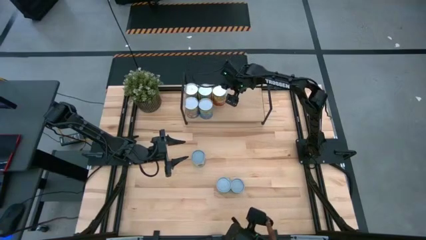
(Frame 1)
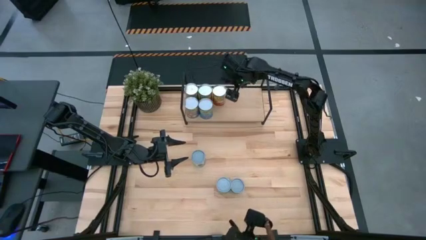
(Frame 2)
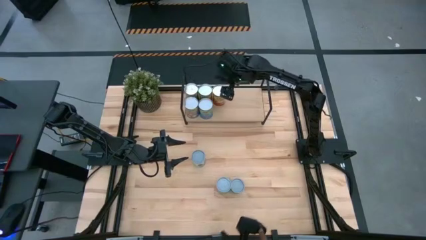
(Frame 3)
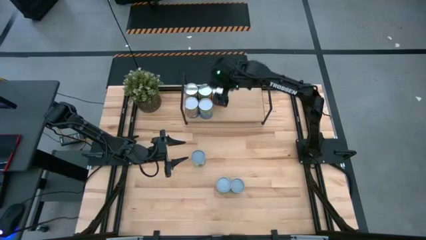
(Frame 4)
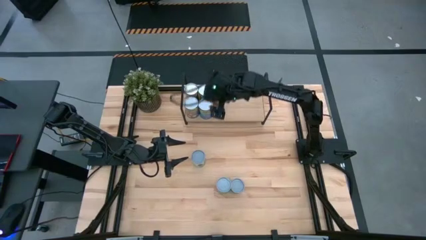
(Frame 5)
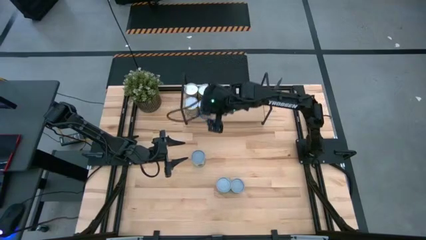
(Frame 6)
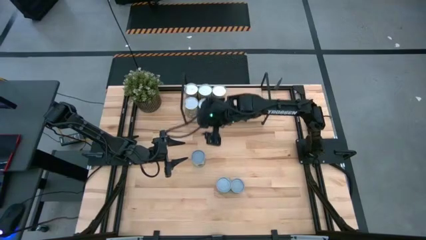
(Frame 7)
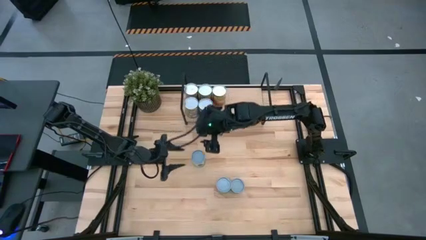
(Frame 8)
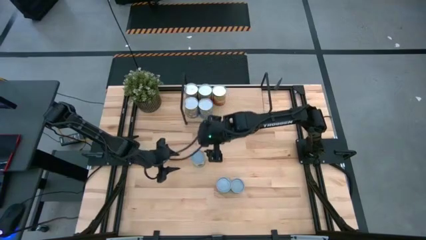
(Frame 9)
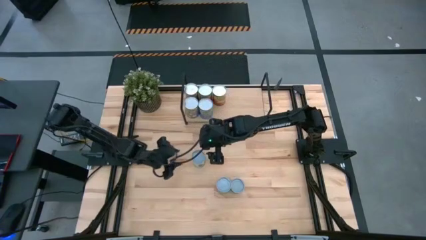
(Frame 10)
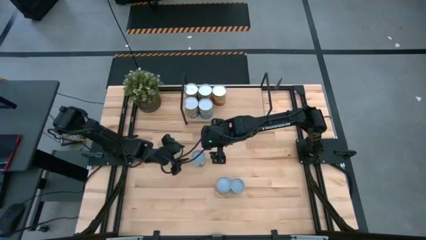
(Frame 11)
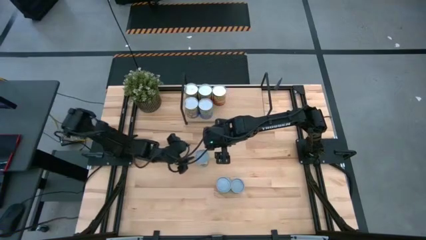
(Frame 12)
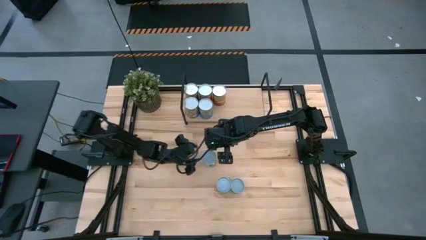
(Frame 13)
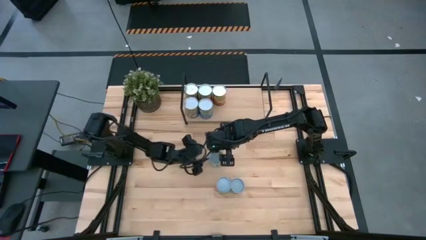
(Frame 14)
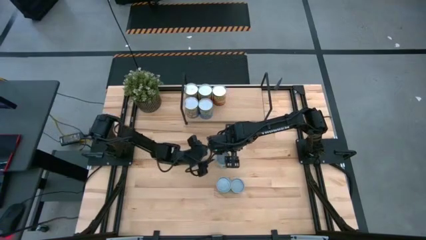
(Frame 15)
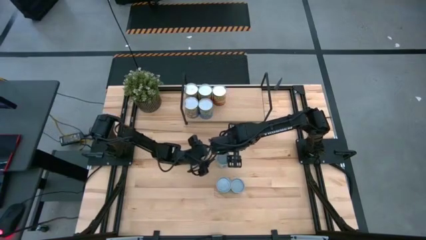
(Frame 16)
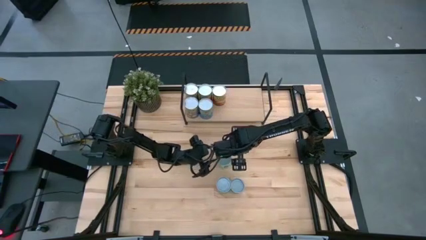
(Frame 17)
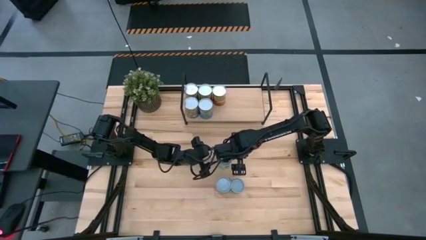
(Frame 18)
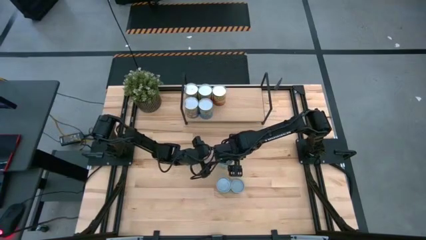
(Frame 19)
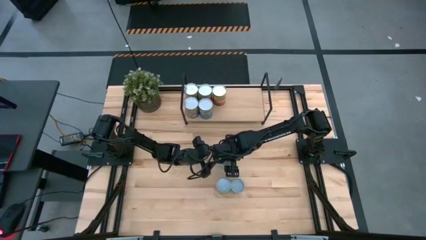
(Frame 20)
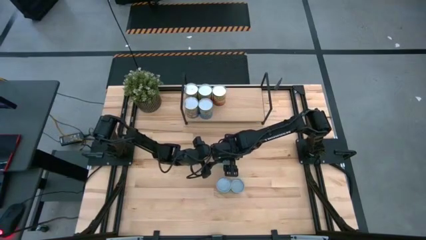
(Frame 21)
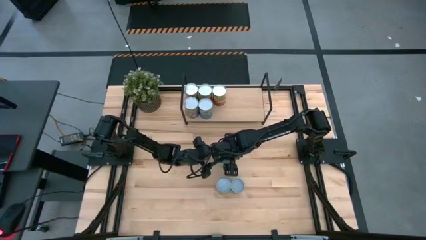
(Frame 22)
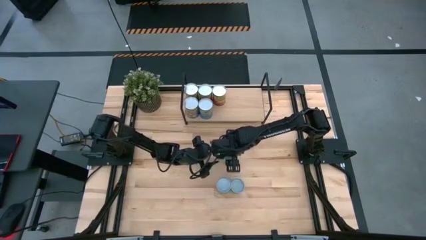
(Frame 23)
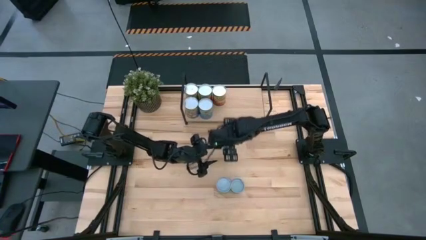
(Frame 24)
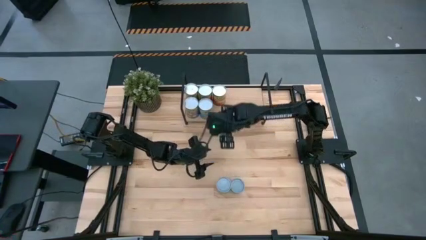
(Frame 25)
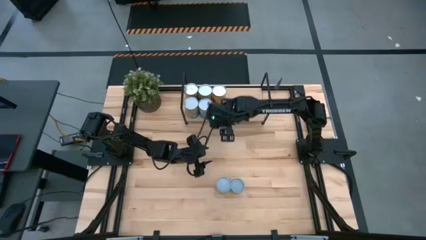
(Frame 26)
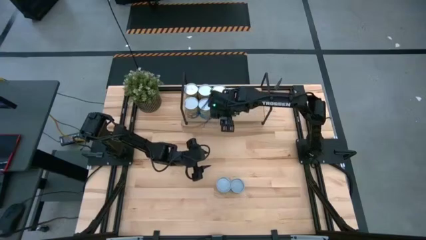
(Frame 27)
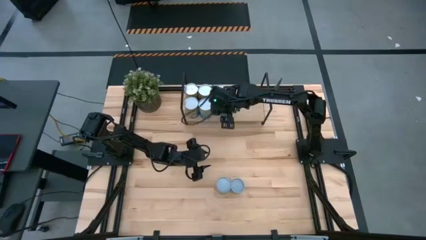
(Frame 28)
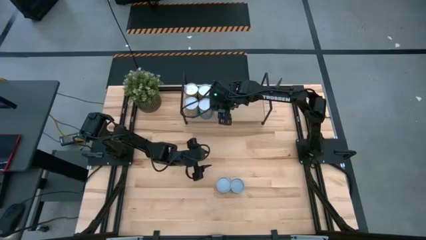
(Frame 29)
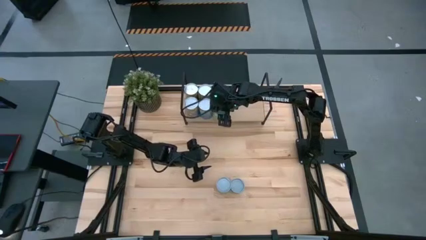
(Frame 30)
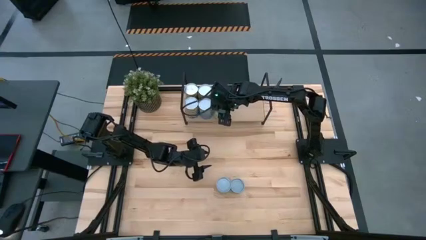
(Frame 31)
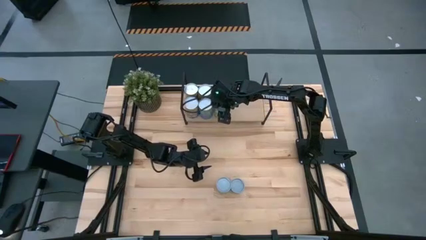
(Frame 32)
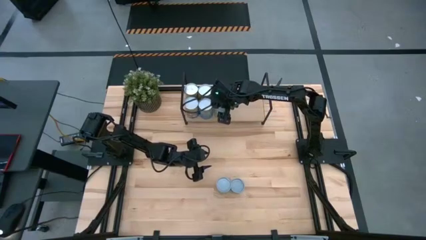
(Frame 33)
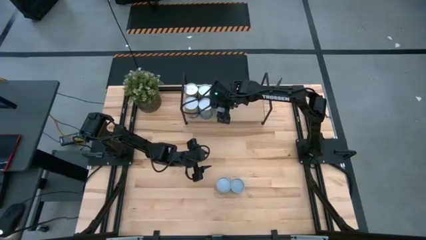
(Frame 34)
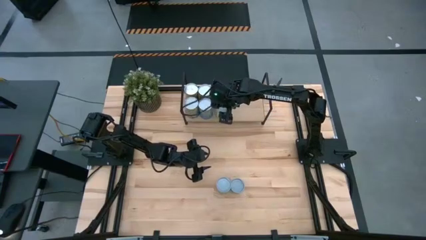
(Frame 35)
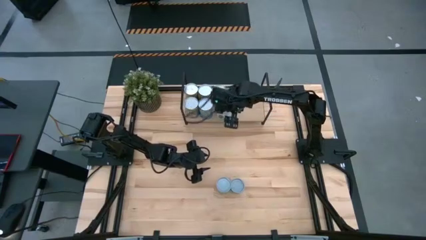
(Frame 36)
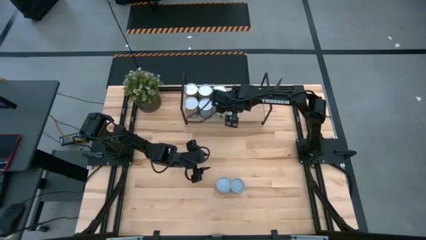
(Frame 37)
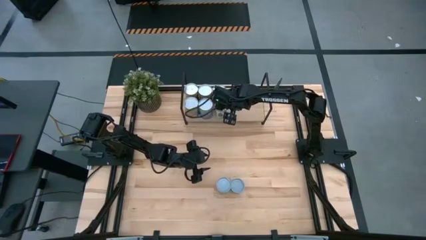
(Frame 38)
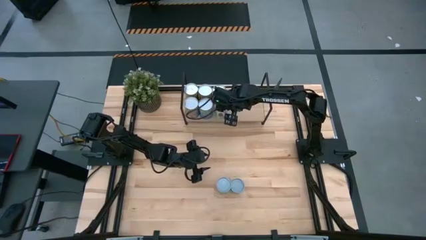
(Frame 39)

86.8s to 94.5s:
Task: Pick and place cans onto a shelf
Put the canned mixed vegetables on the shelf

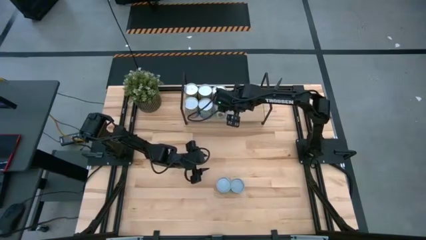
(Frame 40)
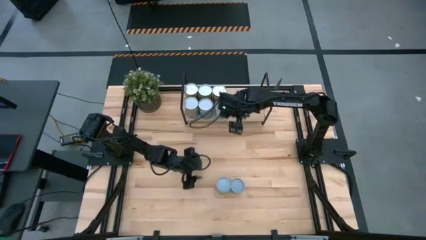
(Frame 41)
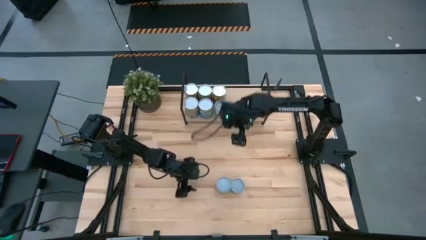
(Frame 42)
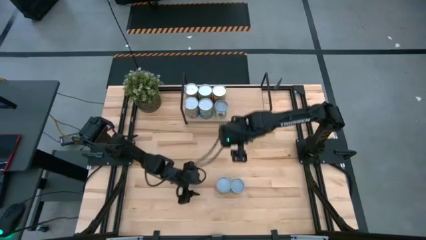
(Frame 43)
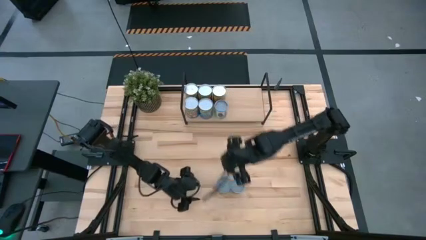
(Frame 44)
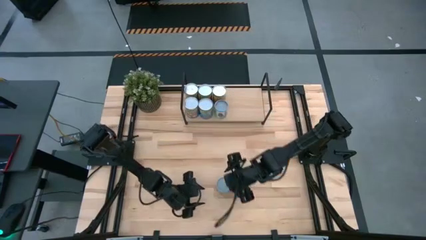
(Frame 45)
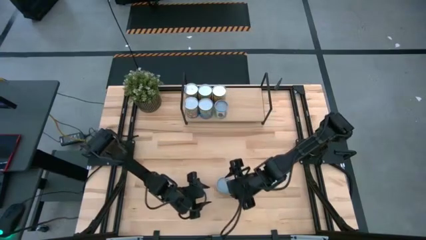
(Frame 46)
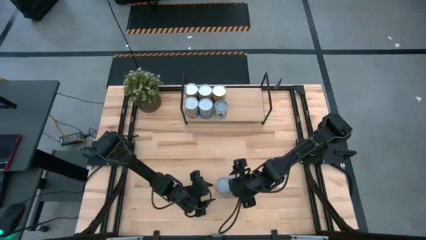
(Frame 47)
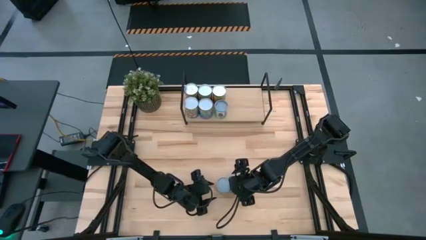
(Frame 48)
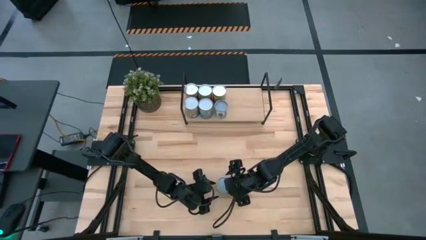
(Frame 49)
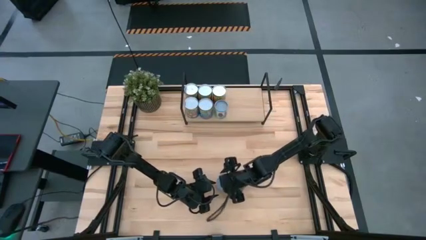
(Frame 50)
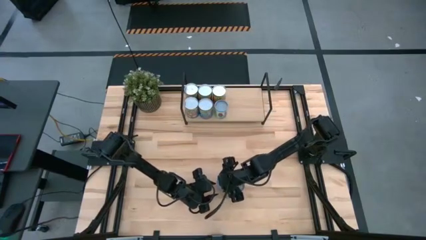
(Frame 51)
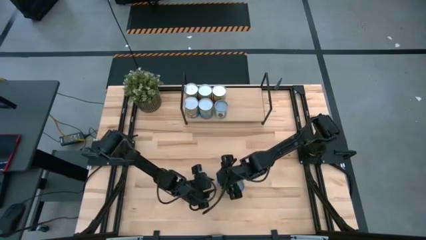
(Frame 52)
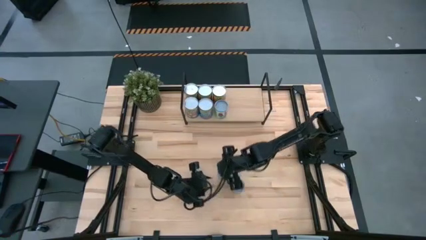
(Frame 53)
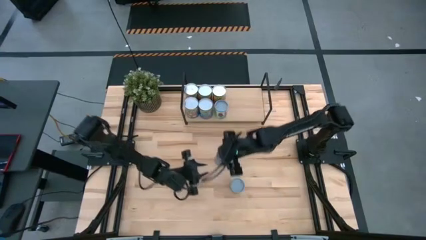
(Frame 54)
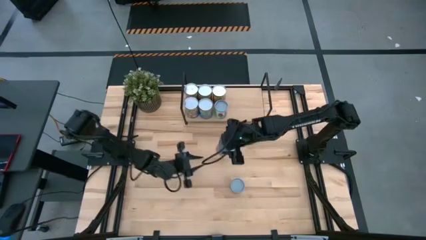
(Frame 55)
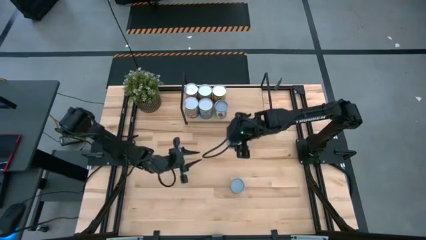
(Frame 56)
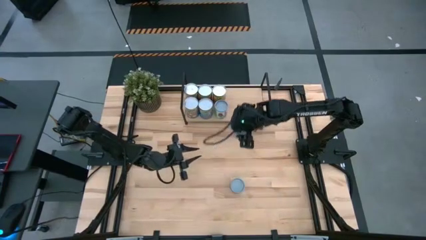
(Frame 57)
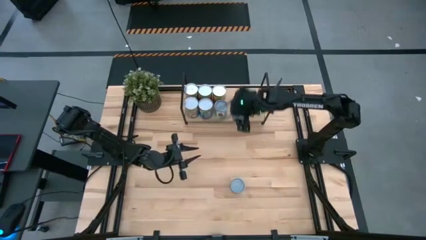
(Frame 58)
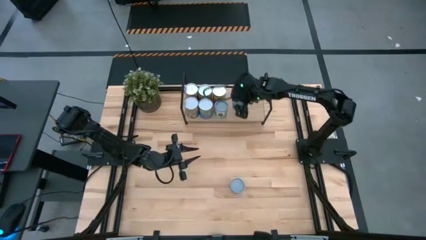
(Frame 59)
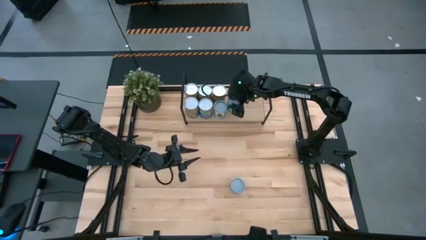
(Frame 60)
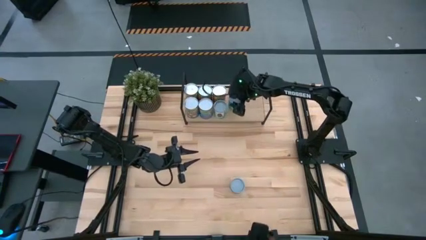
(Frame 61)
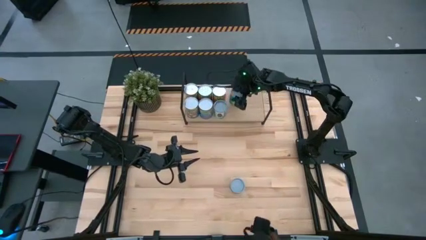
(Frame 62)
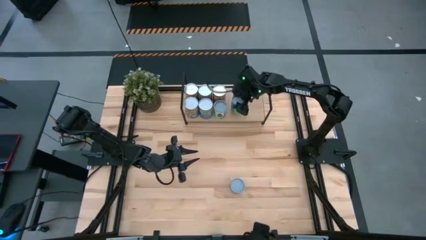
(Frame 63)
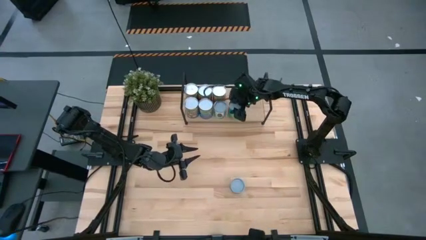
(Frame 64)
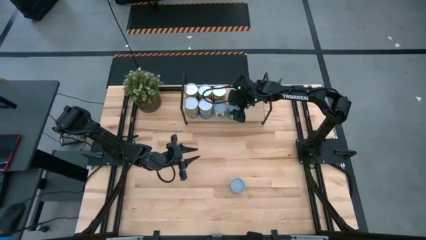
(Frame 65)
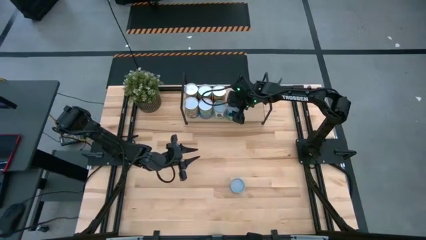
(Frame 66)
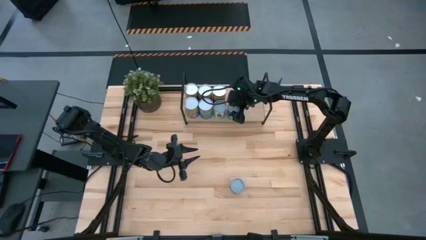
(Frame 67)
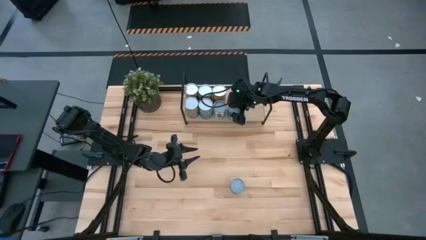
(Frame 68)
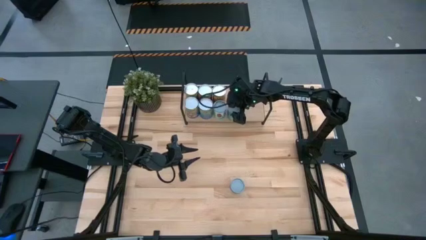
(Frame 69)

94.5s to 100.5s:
Put the canned chicken soup on the shelf

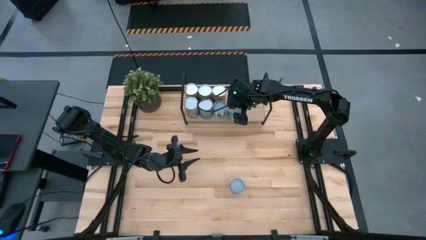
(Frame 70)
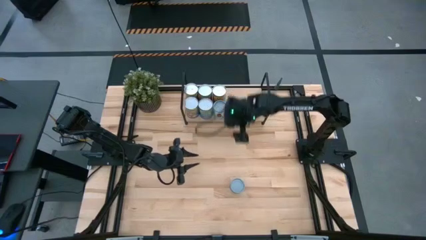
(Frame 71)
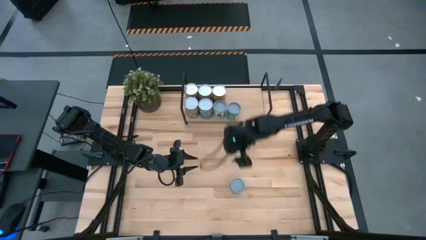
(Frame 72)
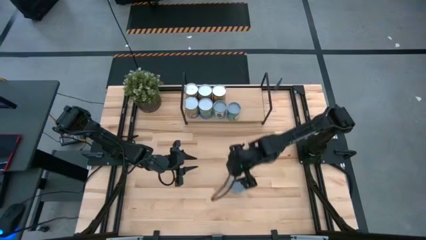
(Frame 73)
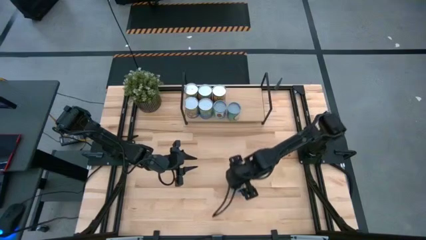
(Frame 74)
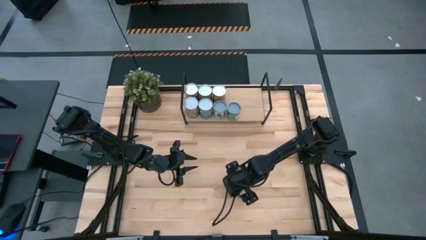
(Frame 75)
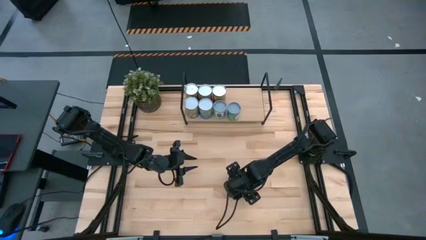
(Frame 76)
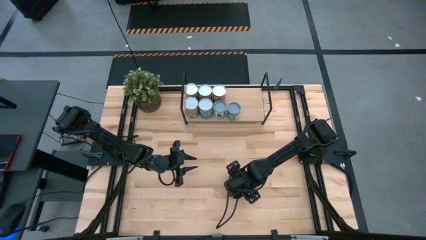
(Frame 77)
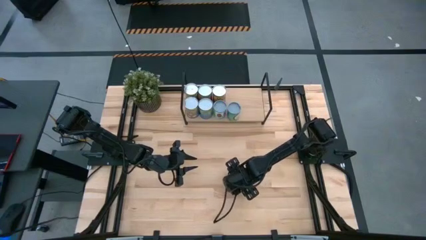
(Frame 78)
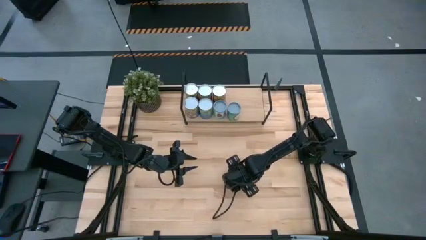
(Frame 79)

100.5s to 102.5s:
Put the canned tuna on the shelf

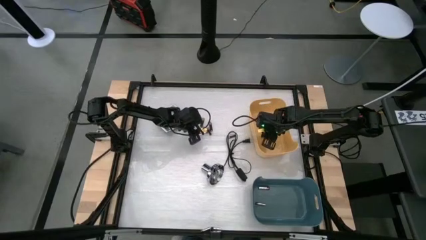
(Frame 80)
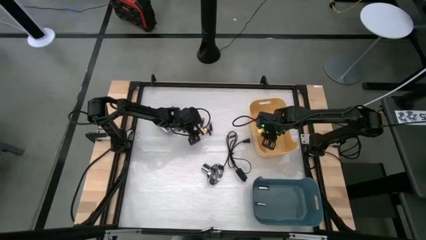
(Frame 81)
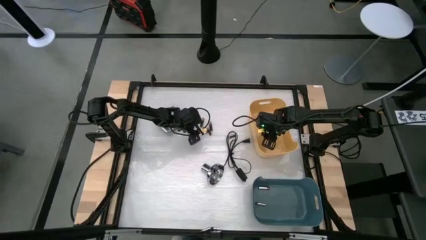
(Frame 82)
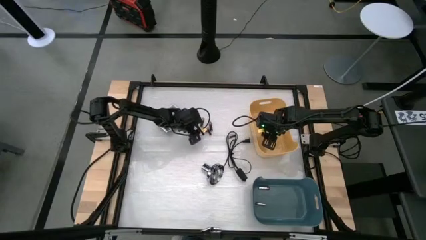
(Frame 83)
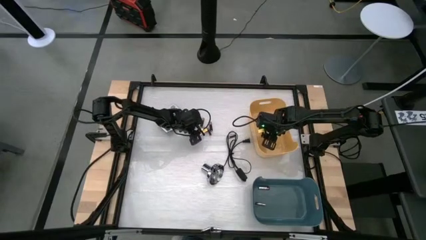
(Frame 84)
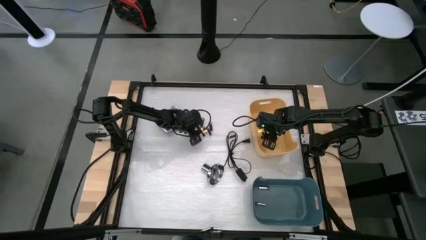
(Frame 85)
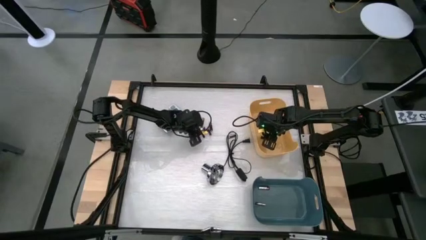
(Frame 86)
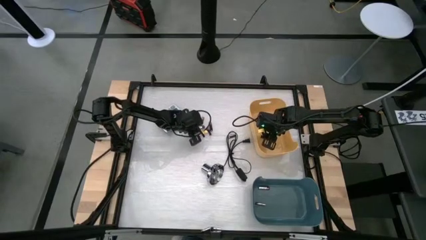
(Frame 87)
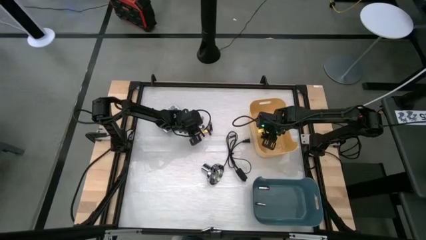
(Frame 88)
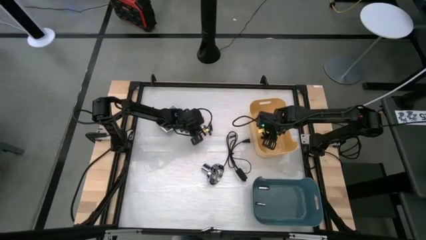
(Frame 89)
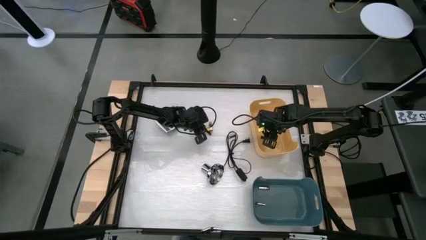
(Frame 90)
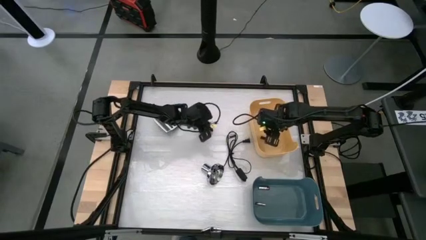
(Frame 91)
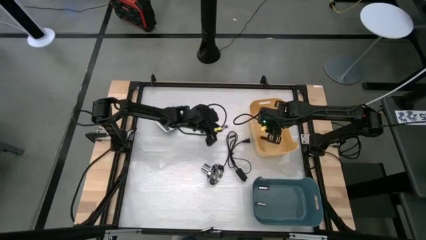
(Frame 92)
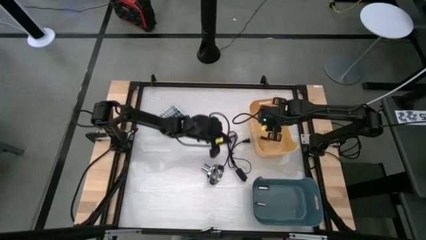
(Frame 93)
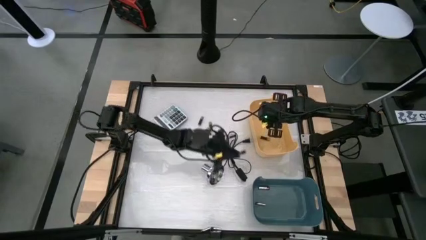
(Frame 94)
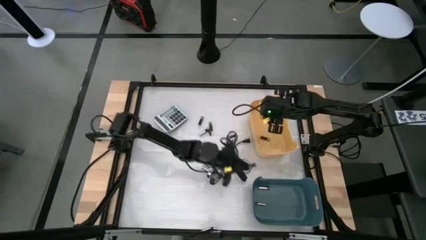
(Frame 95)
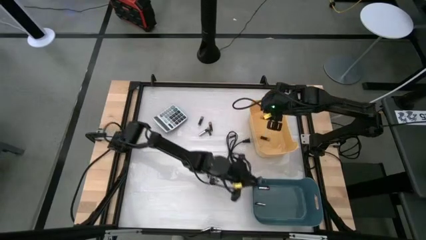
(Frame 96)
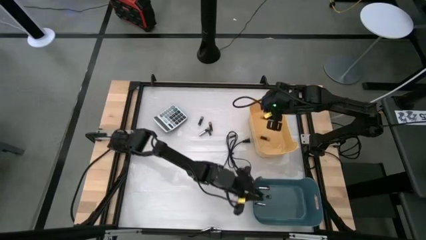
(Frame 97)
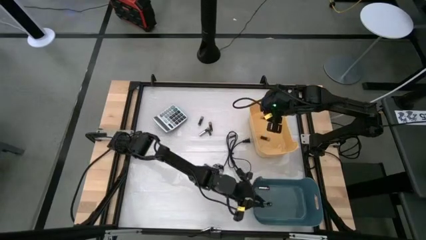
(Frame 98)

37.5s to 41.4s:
Task: Sort batteries
Put the white battery into the blue bin
